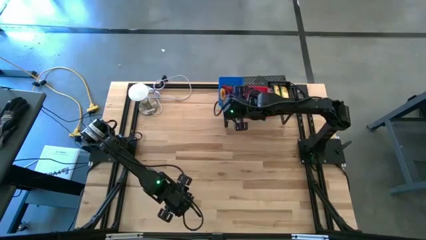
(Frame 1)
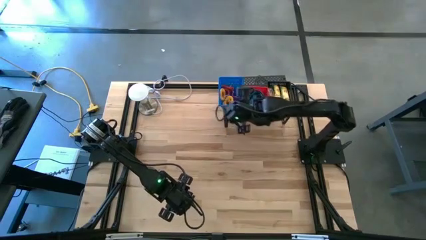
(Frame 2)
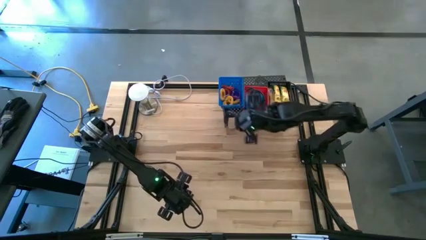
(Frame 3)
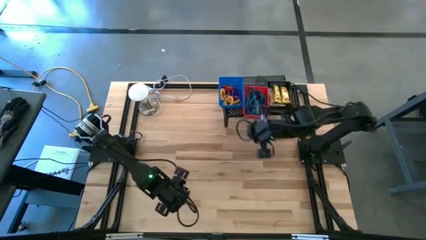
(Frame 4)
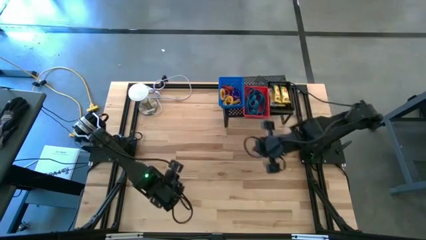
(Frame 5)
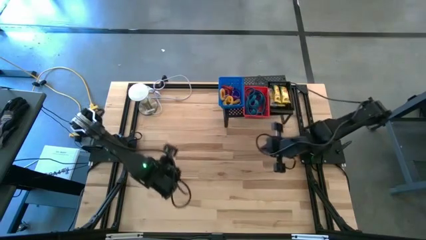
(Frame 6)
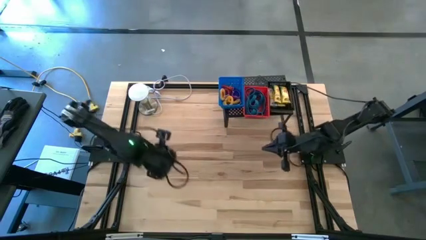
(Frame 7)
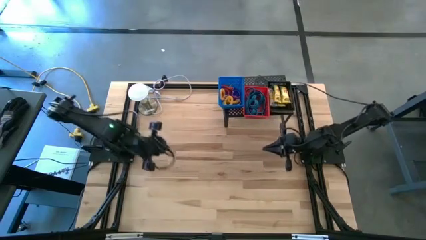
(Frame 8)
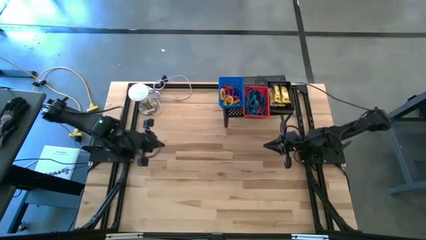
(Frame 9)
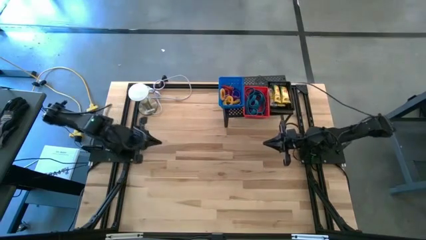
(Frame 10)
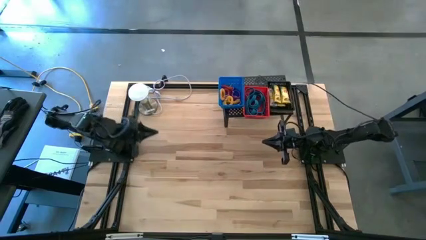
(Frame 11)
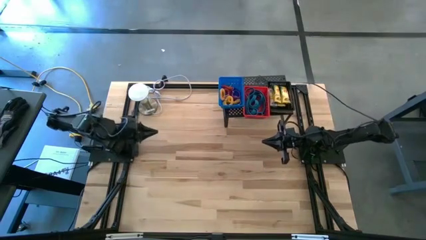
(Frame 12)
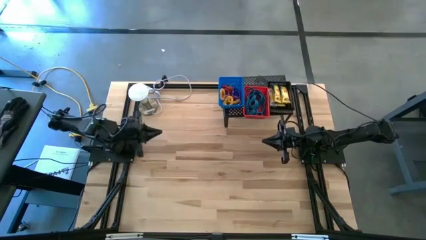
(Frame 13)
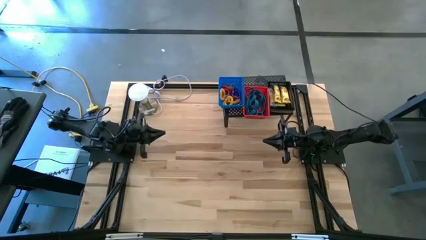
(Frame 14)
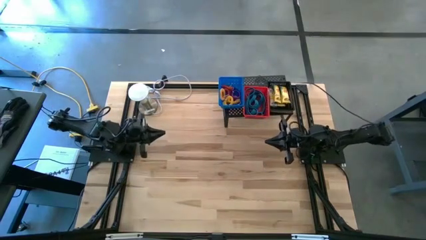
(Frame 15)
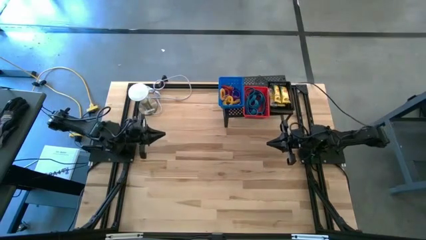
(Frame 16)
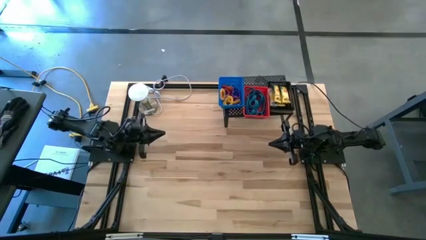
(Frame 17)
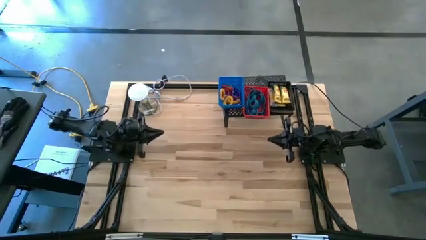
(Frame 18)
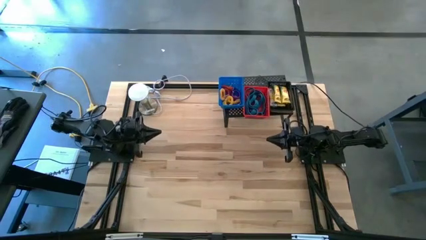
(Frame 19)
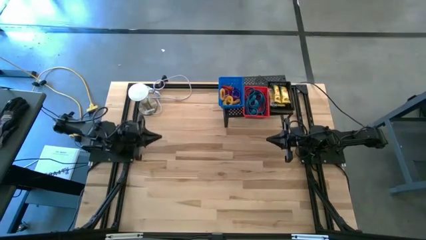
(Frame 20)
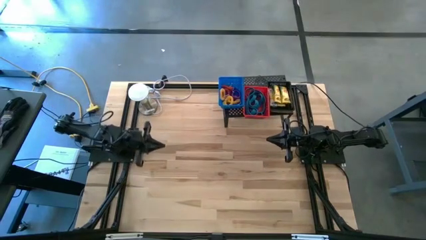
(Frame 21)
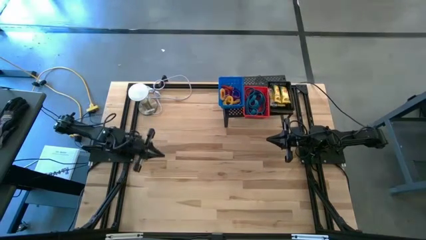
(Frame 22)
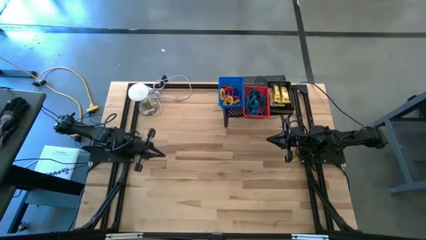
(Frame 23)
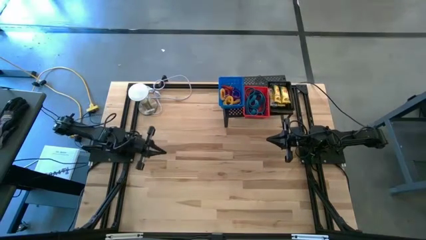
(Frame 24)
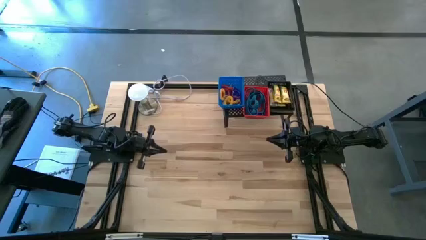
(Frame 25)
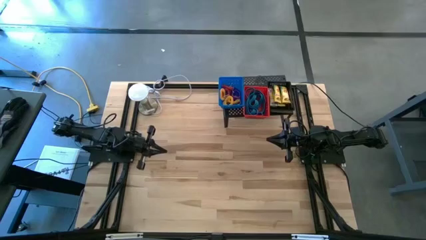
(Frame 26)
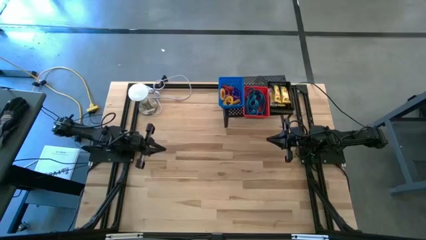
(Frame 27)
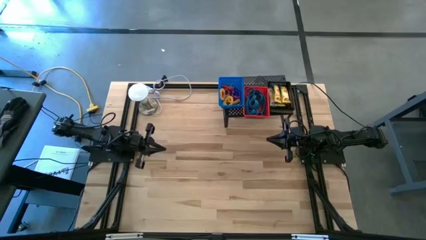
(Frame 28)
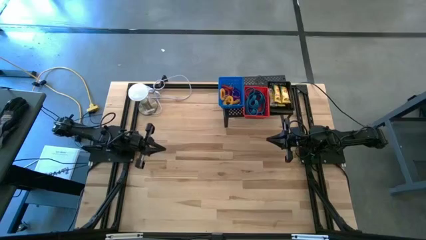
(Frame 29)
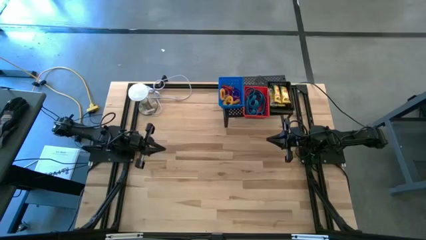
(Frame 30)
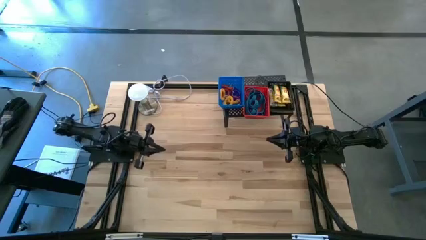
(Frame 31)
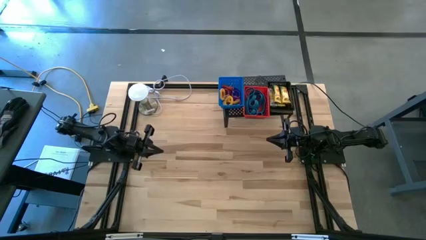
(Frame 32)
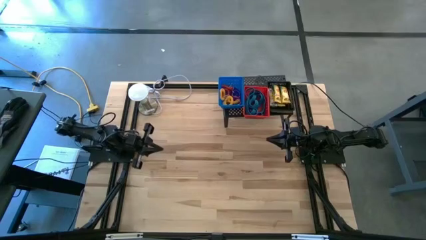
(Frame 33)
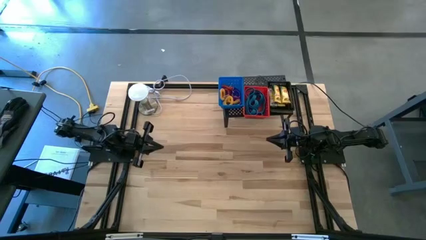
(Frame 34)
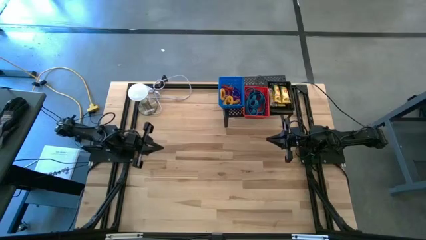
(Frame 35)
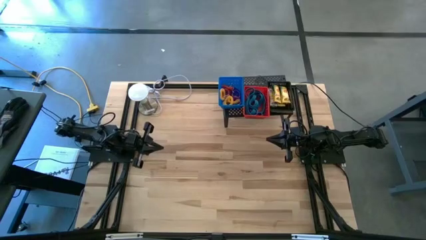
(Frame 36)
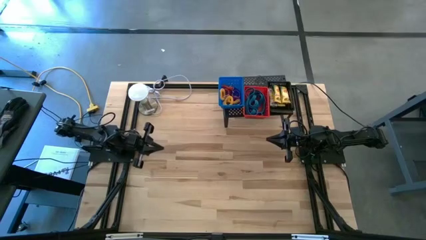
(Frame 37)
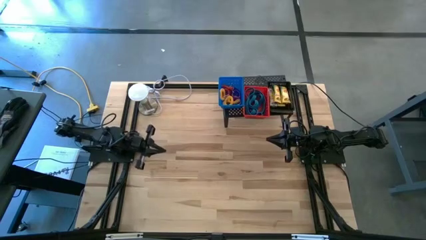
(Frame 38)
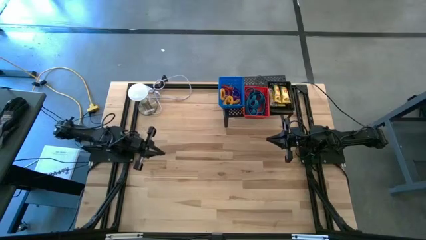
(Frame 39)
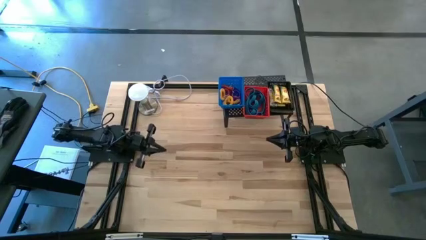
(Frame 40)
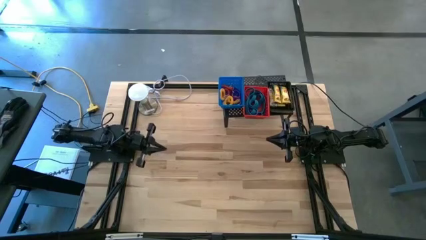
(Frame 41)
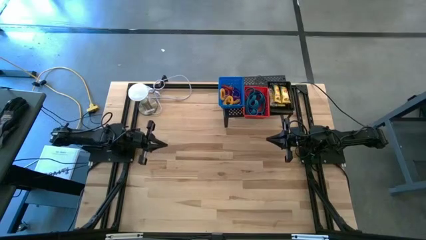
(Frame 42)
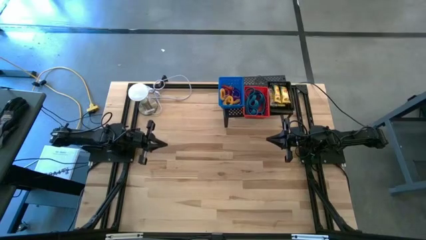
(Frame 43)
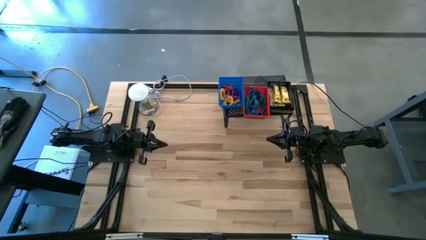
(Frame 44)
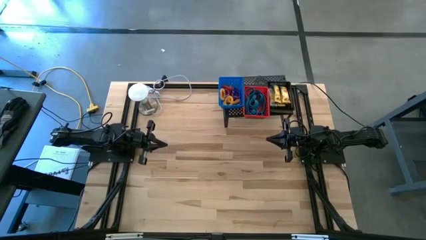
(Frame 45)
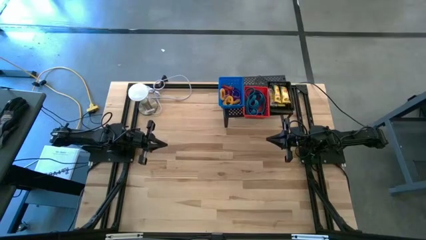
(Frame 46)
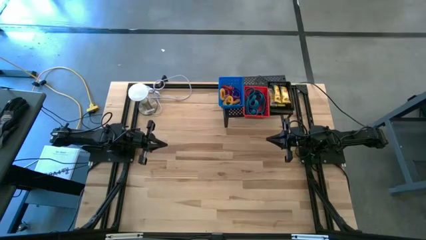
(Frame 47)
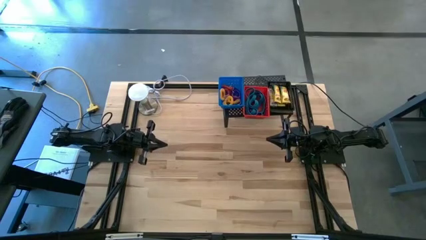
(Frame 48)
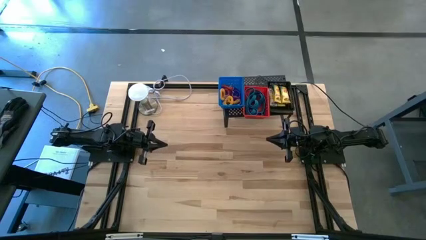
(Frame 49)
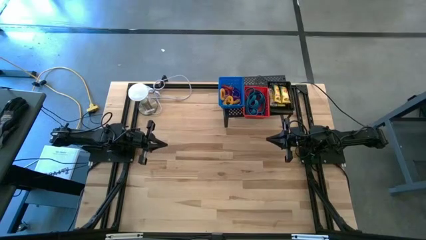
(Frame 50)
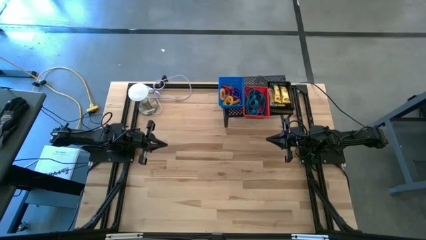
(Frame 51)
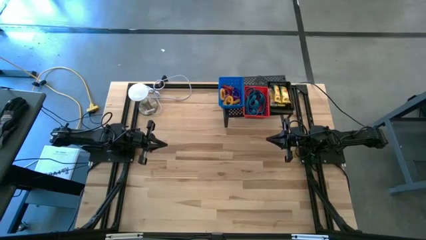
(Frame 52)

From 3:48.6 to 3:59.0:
Task: Pick & Place Office Desk Supplies
Return to Home Position

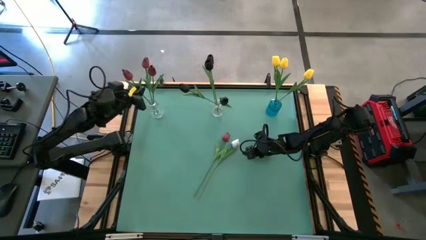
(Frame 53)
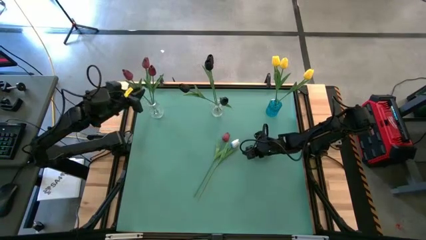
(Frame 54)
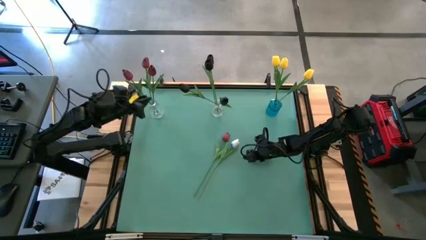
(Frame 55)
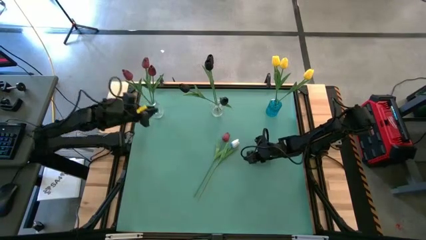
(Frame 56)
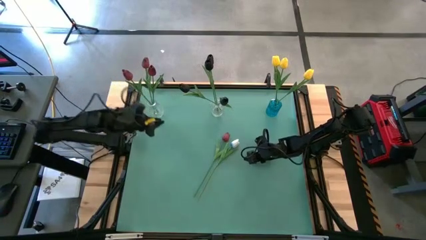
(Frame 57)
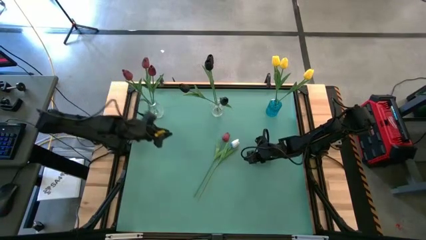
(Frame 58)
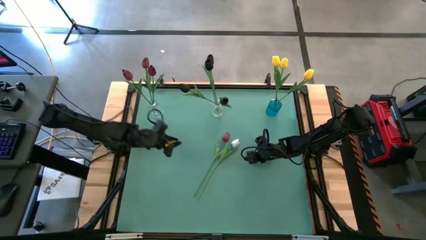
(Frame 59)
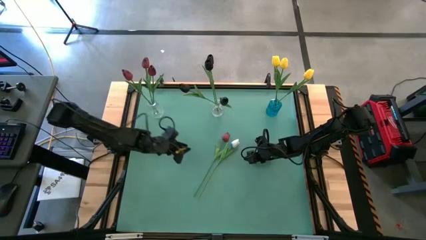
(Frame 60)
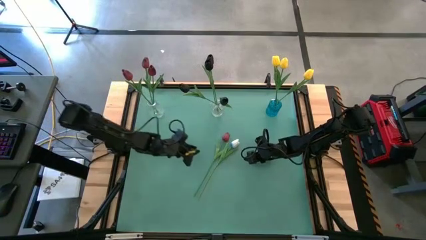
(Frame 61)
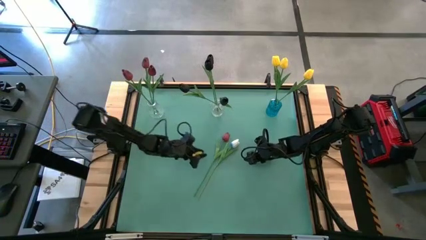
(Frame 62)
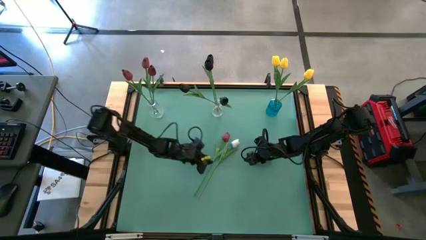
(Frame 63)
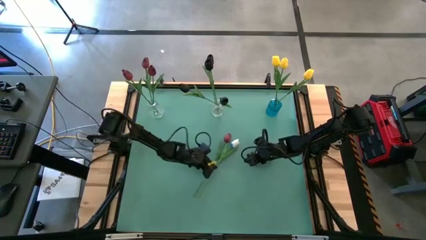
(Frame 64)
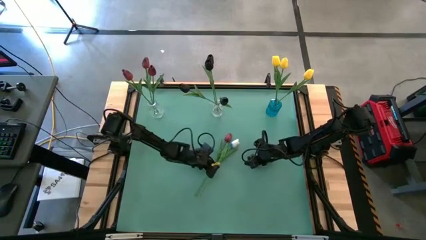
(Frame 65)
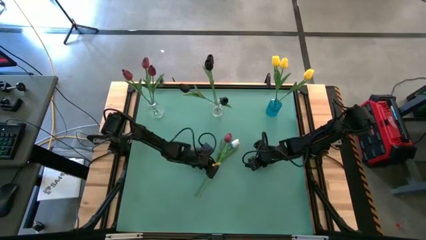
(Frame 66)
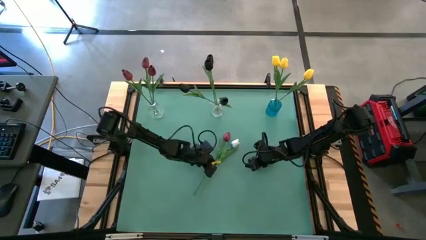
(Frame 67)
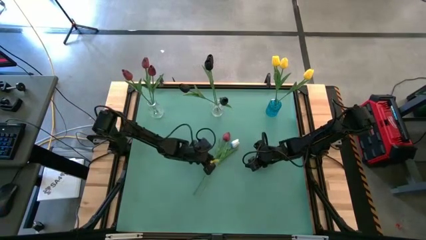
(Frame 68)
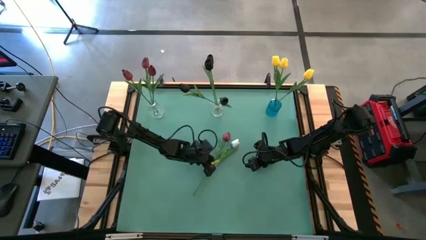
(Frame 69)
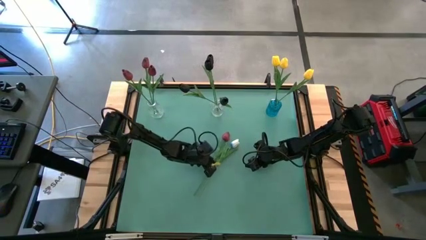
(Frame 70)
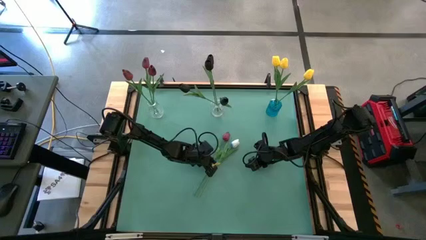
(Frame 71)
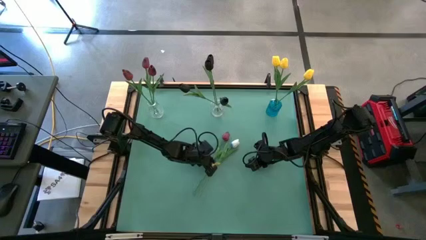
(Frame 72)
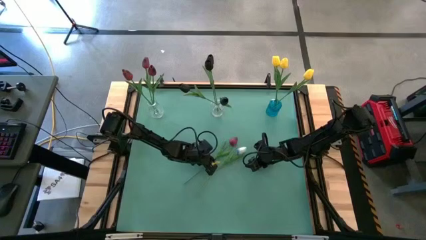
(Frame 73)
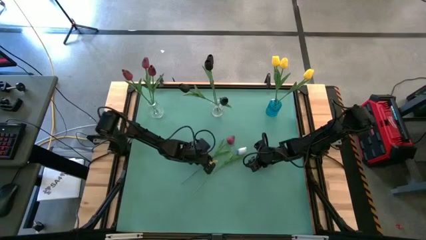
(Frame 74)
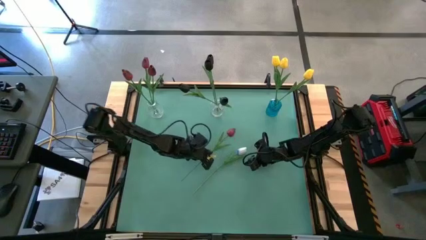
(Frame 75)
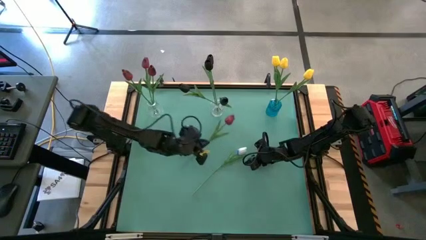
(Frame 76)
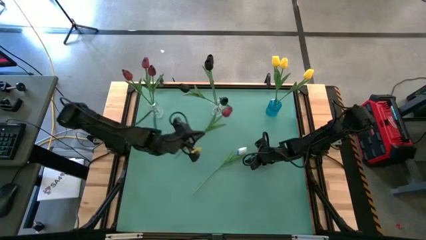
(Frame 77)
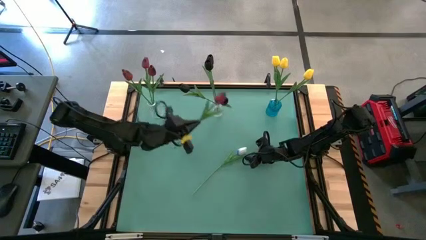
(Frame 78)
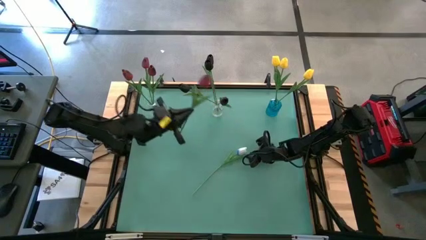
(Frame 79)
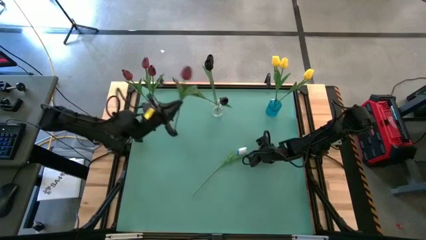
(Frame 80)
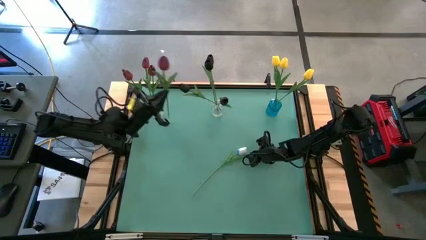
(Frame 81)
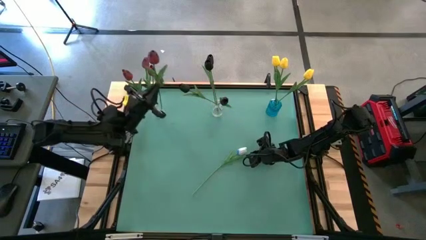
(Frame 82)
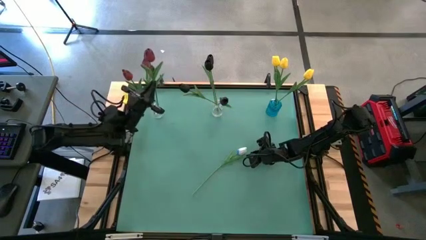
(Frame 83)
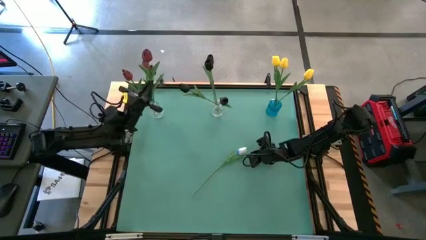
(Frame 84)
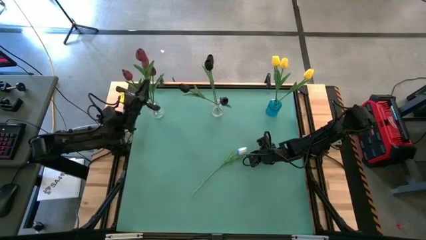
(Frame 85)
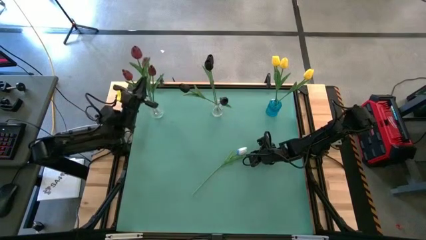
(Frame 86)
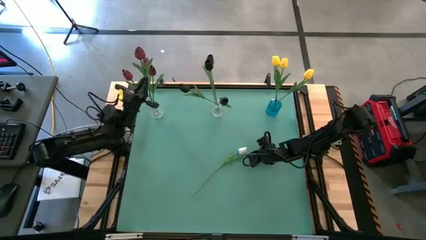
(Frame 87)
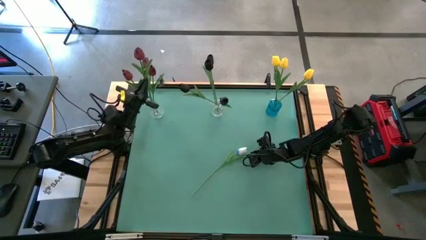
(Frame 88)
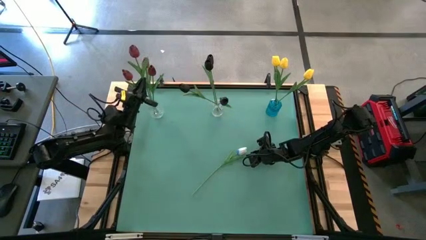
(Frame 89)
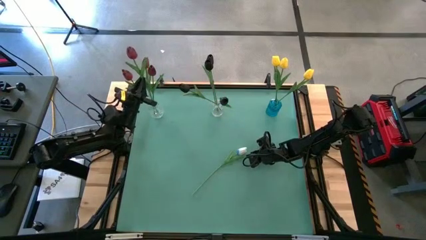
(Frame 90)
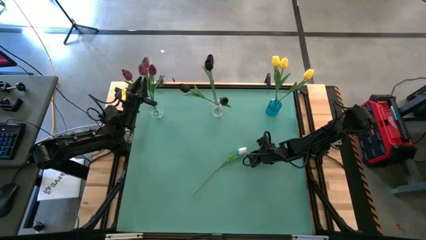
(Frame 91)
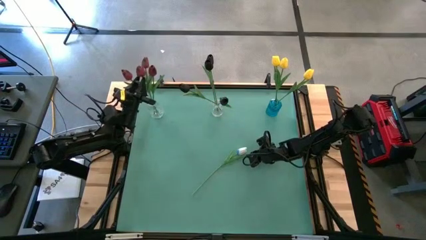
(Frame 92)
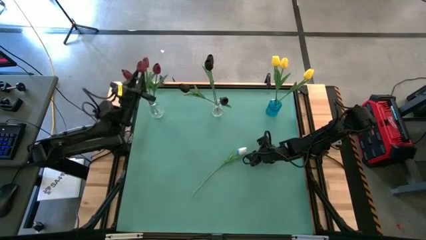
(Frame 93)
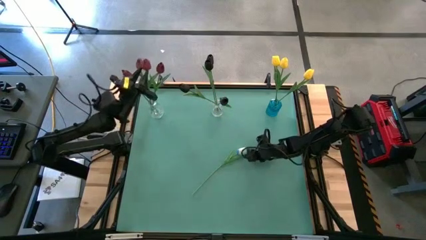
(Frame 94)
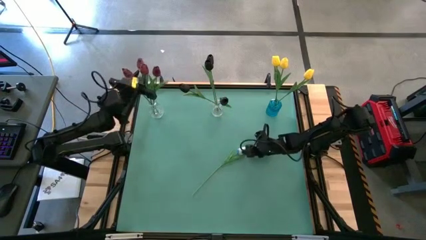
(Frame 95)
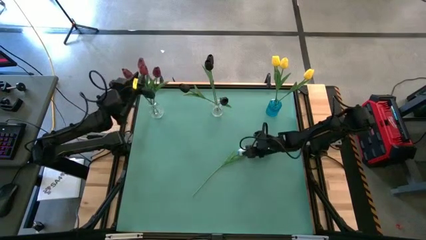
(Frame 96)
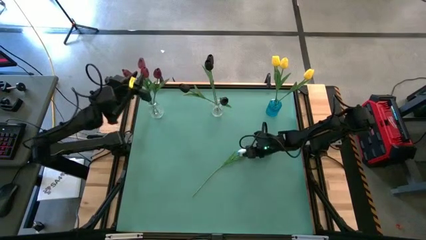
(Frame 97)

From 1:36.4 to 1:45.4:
Task: Sort flowers into vase by color
Put the red tulip into the left transparent vase
